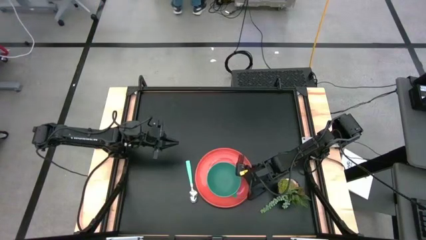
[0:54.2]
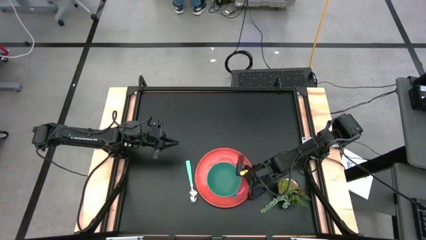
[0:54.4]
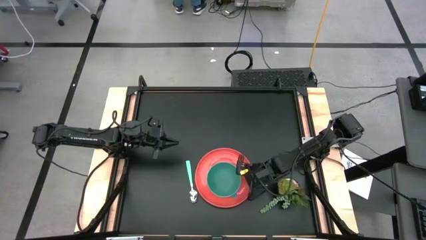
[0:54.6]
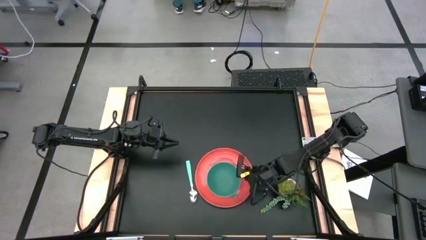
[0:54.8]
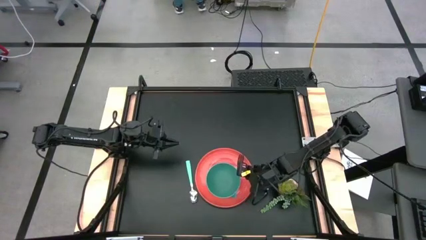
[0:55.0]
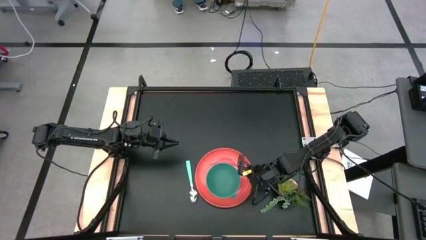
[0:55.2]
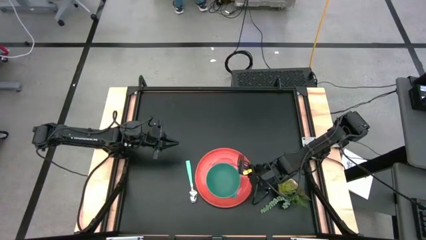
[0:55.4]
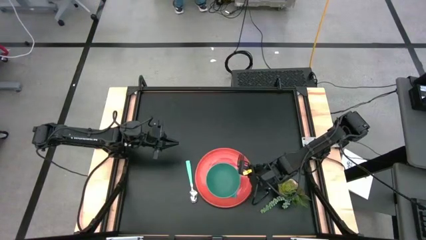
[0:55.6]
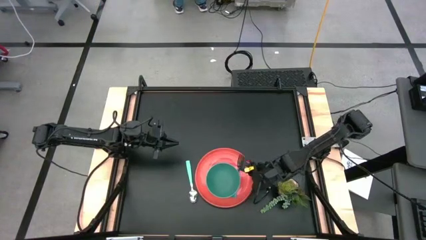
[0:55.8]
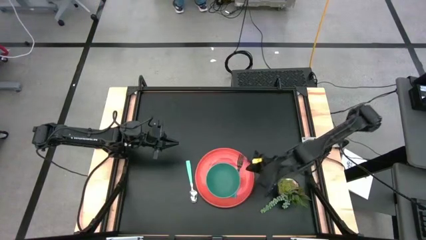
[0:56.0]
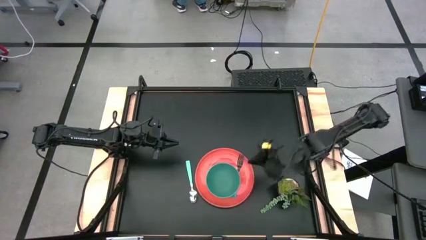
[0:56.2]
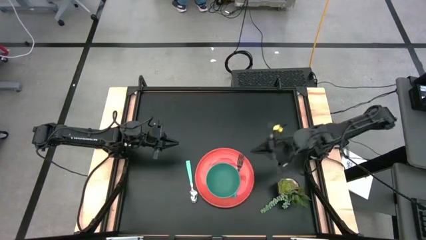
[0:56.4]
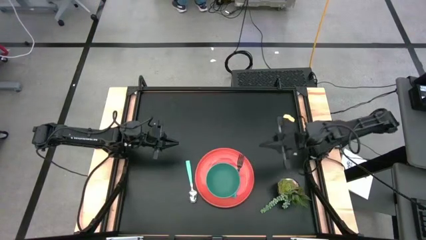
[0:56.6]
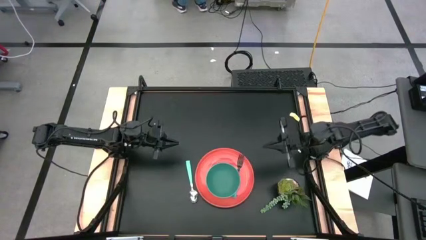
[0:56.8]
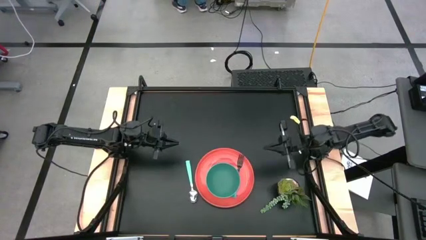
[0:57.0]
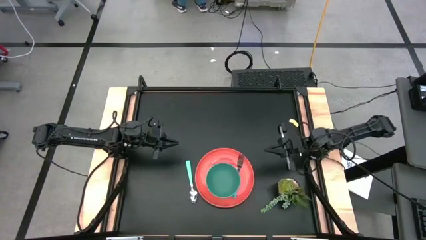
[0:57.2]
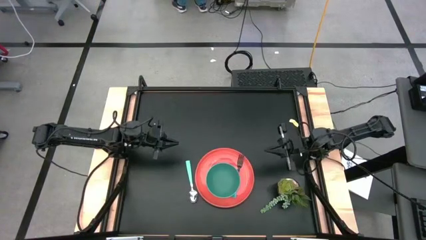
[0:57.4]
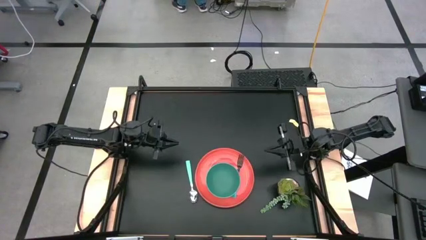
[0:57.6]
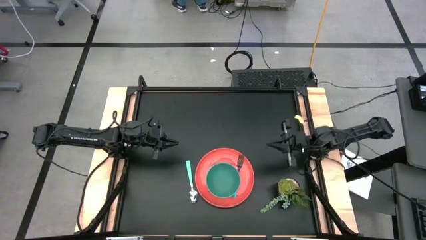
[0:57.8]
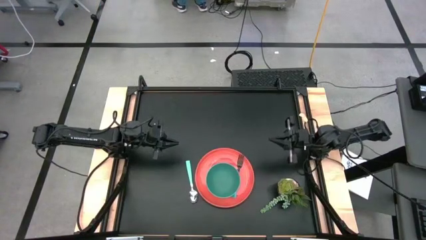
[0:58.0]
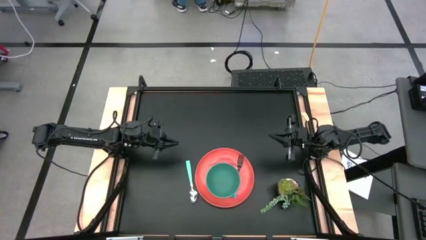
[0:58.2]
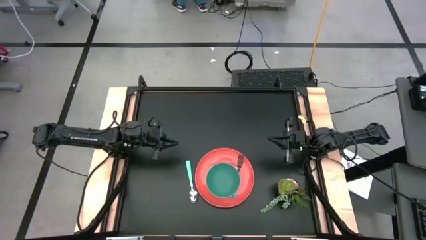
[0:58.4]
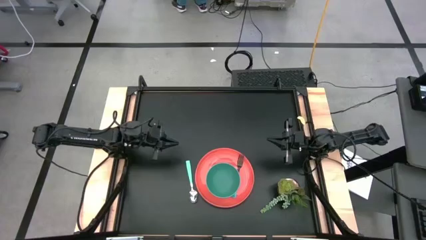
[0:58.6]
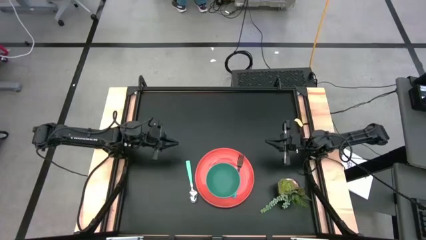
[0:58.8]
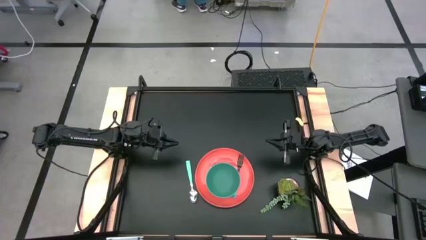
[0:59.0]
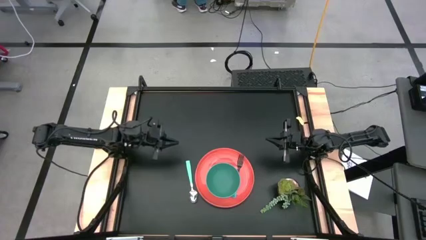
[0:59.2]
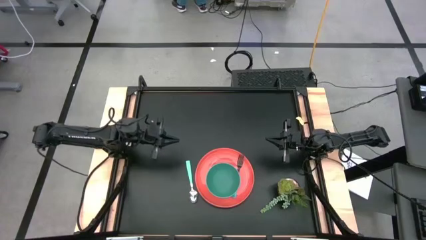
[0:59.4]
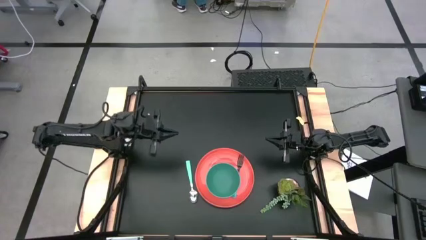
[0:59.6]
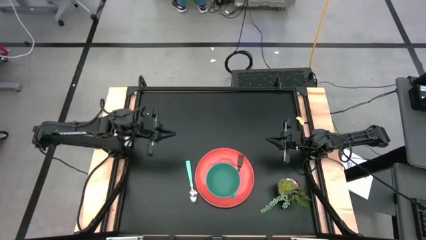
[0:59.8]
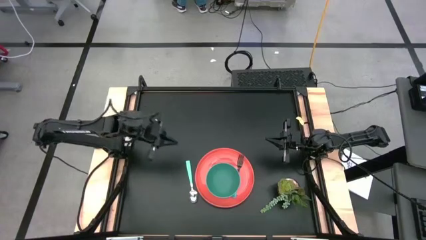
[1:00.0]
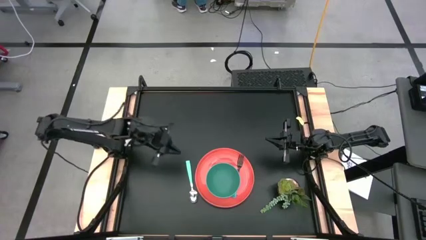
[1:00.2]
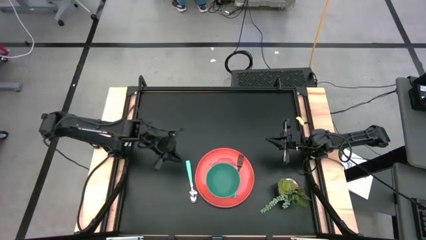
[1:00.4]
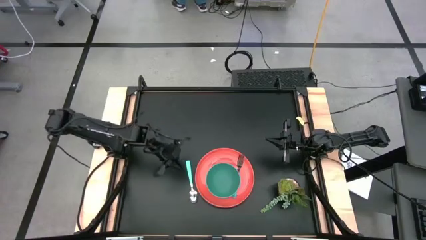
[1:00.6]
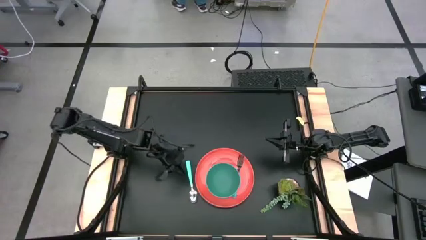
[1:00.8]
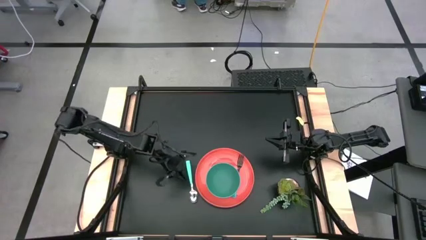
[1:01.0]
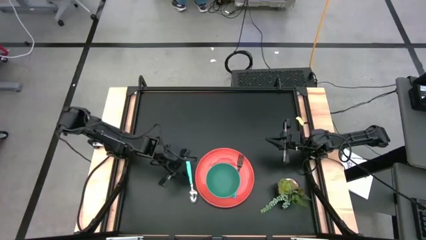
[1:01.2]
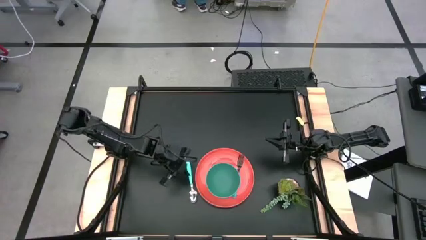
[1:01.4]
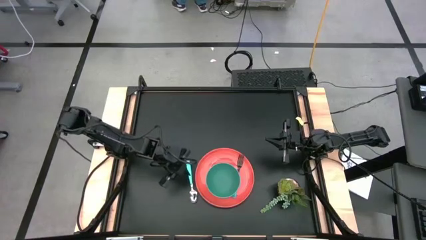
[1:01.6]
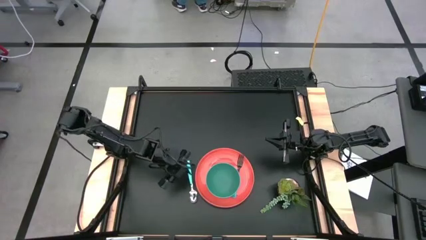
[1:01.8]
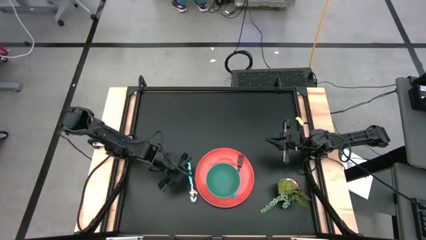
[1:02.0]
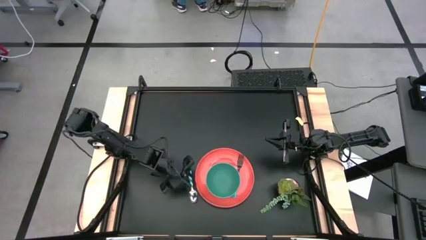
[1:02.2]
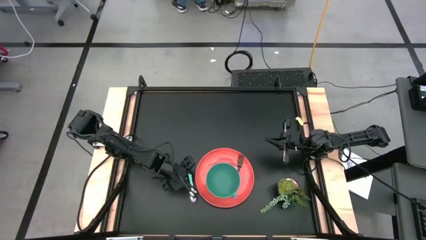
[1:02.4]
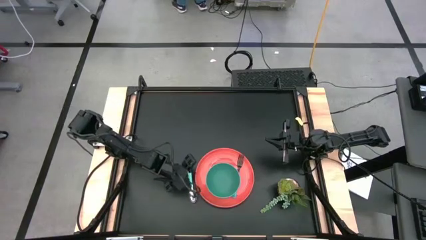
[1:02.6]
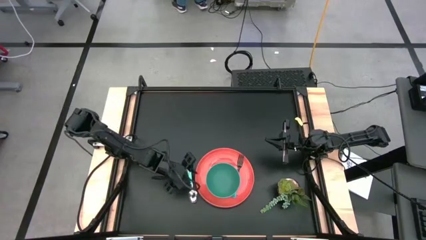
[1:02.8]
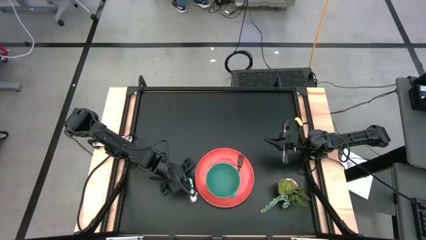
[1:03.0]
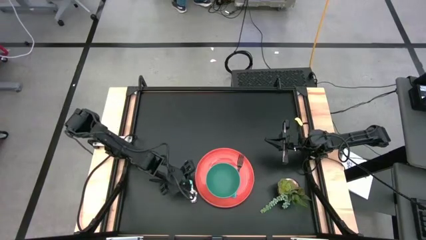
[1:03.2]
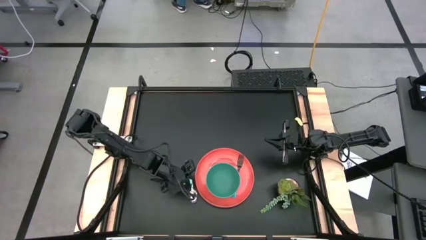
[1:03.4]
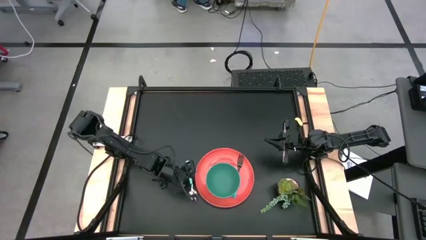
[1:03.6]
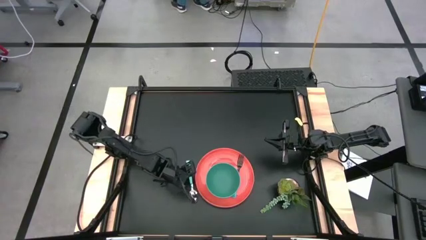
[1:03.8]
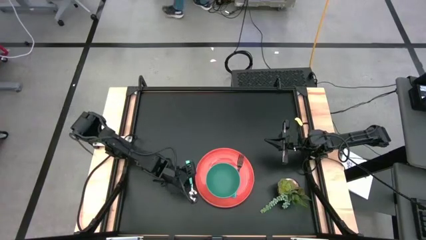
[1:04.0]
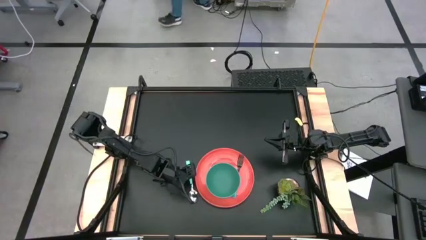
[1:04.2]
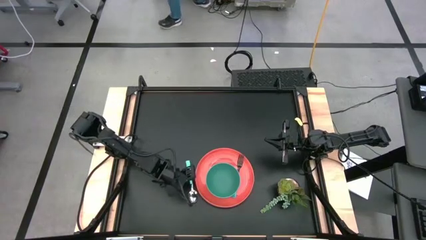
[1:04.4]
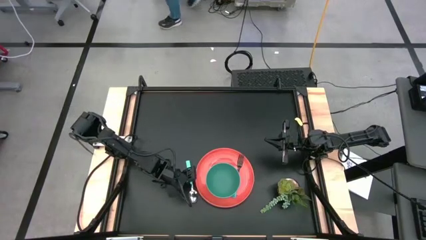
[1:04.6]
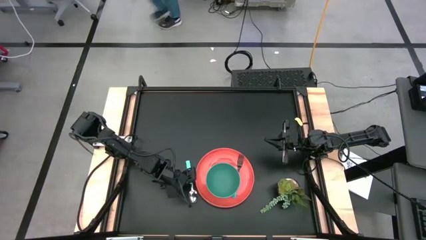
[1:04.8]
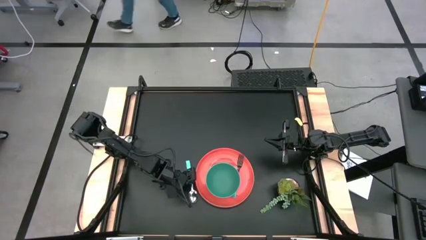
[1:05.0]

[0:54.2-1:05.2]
Task: Set table place
Put the light green spoon into the green bowl

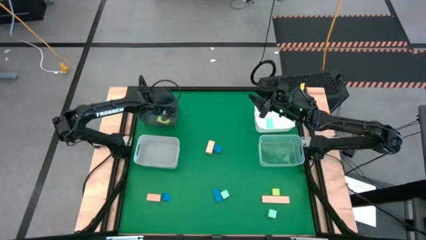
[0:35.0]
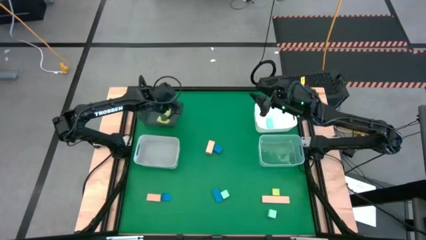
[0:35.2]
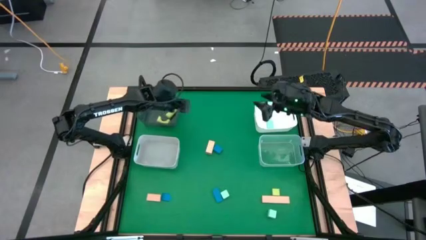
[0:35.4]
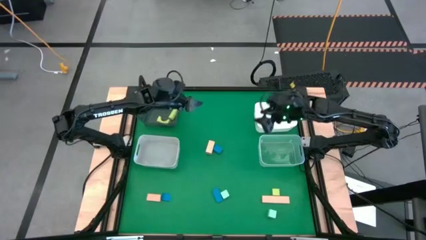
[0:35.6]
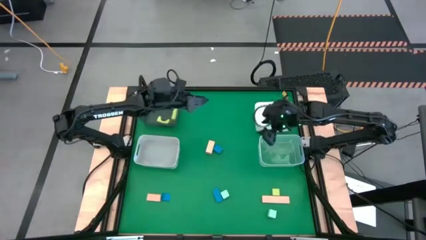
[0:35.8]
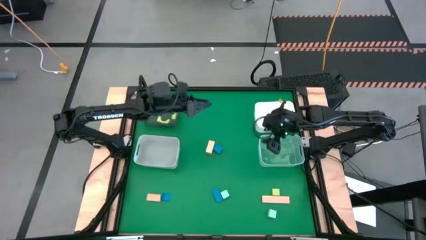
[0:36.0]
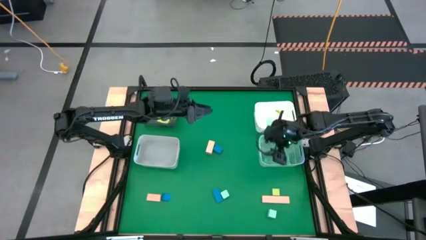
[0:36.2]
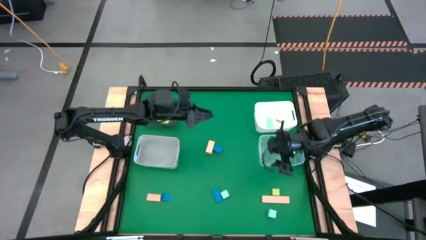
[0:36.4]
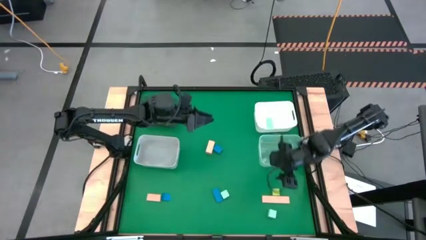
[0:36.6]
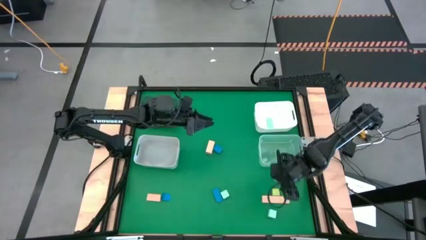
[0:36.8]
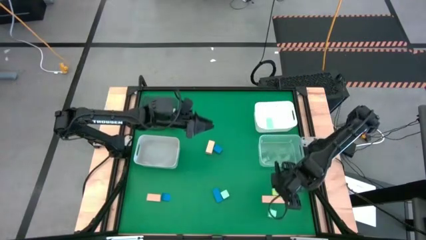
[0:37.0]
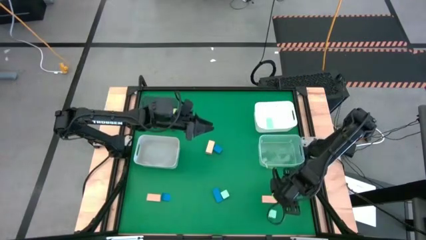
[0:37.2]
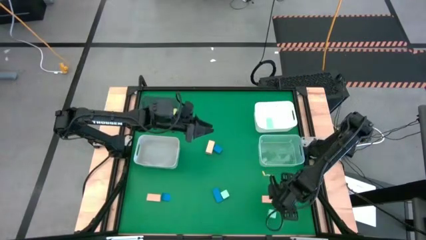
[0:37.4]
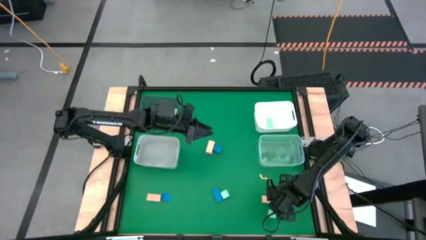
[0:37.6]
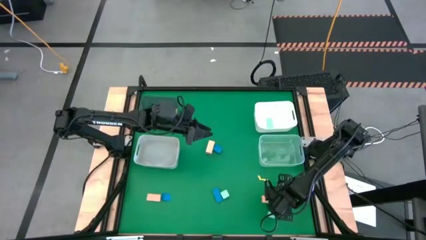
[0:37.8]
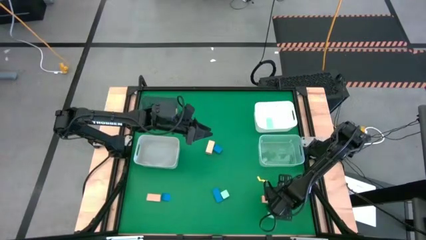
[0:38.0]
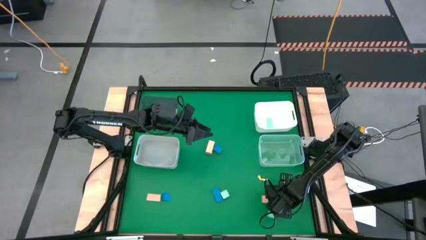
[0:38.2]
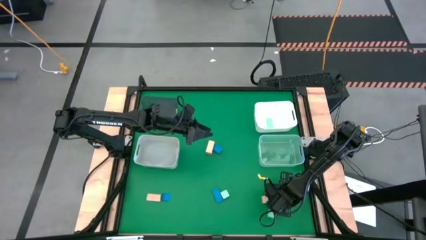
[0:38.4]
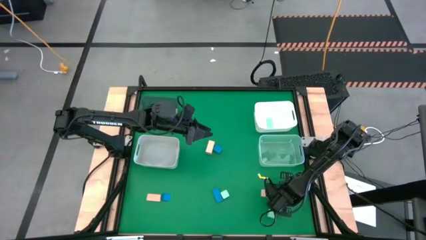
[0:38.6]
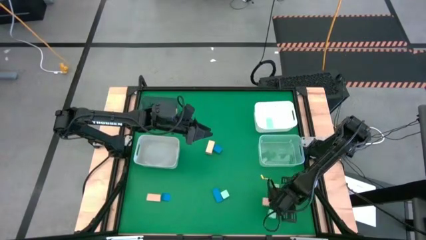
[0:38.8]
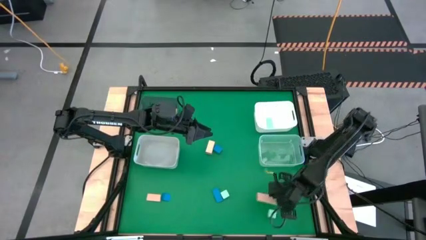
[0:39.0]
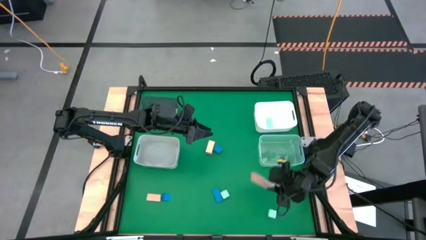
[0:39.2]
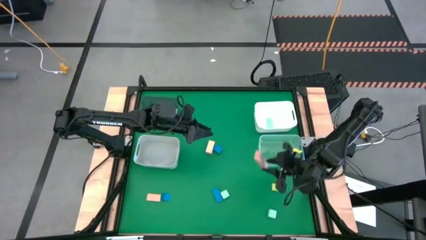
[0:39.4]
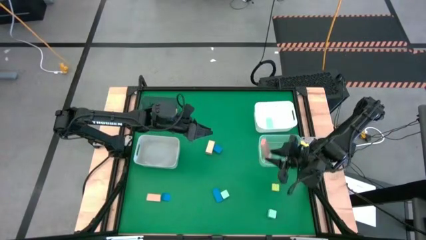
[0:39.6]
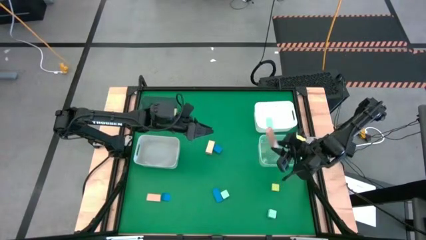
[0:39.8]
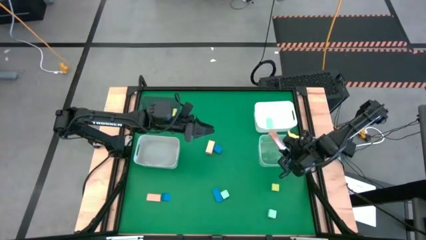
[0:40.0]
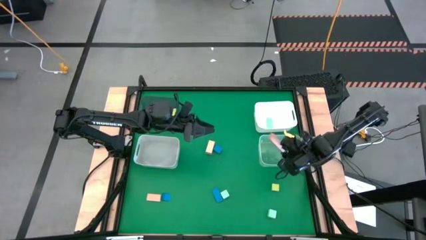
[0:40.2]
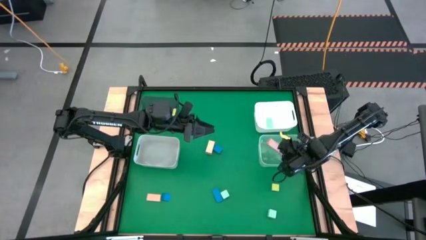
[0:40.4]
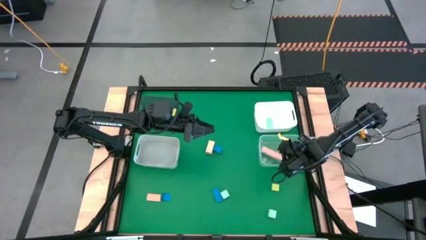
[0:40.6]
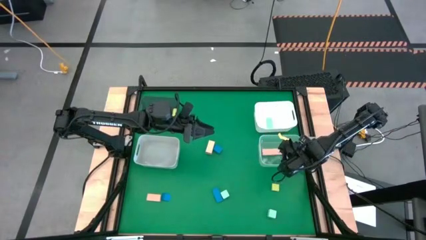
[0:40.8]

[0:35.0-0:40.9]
Task: Sort & place blocks by color
Put the long pink rectangular block into the transparent bin
